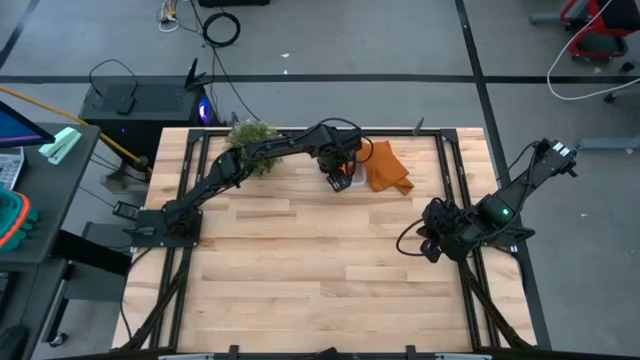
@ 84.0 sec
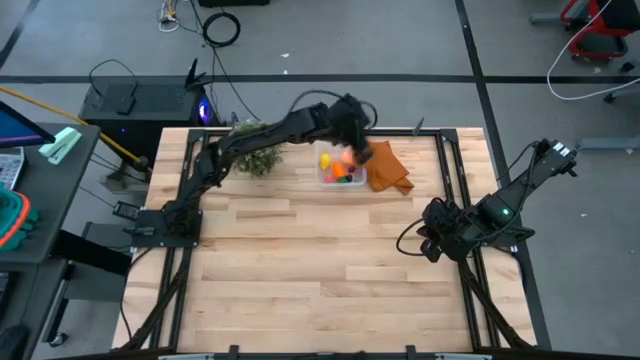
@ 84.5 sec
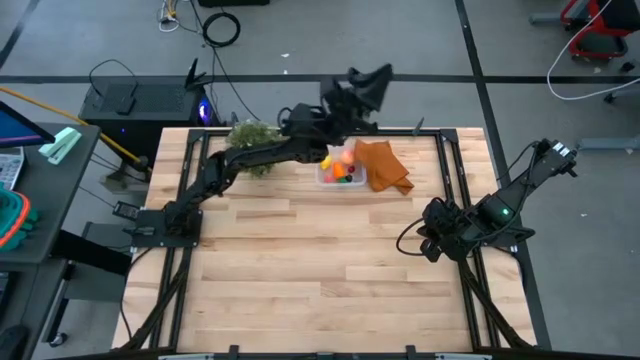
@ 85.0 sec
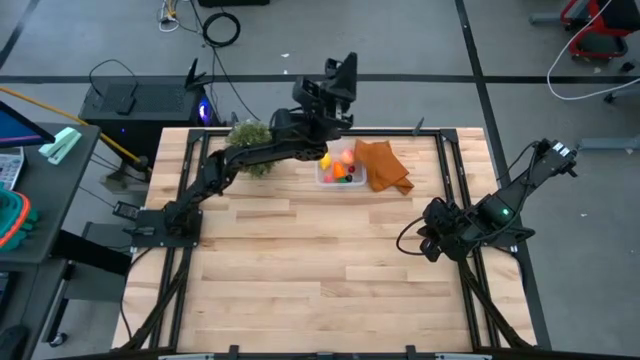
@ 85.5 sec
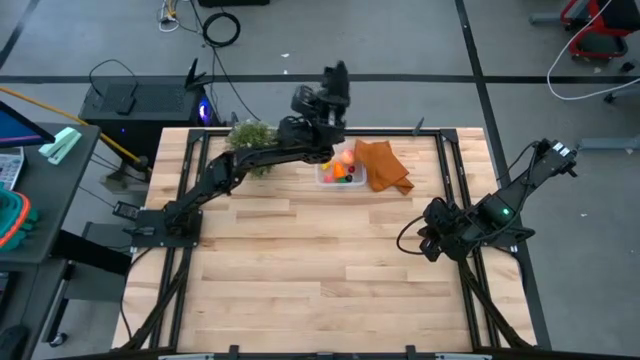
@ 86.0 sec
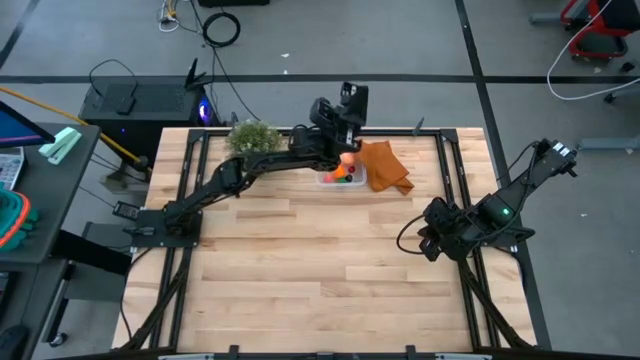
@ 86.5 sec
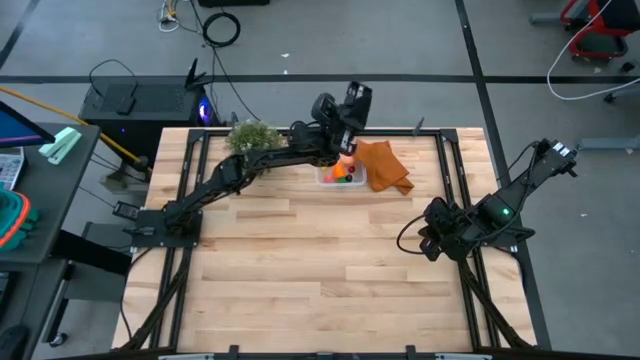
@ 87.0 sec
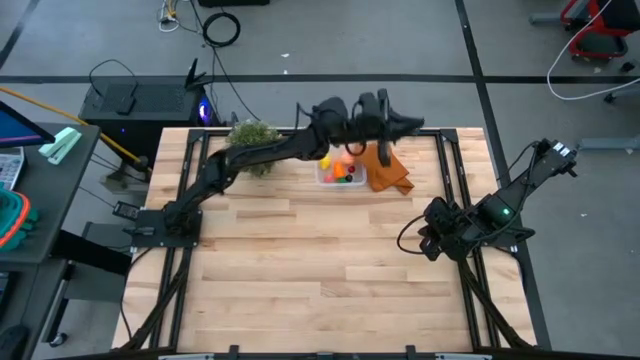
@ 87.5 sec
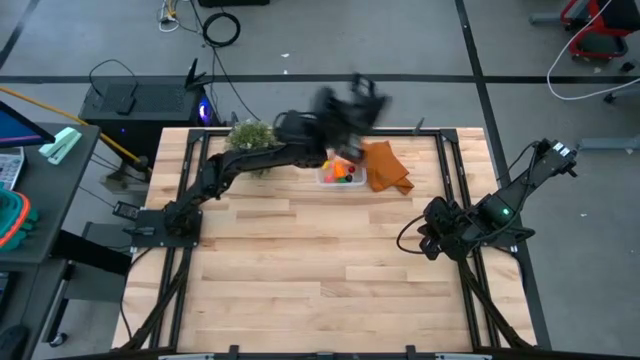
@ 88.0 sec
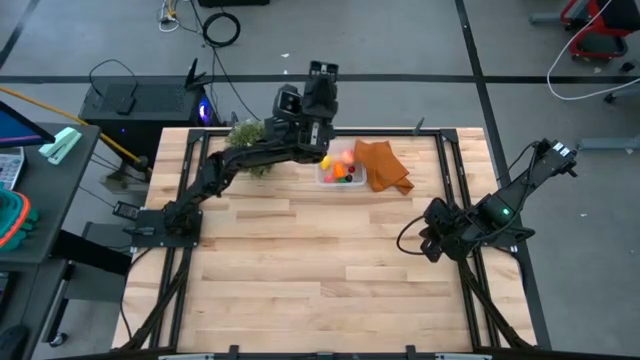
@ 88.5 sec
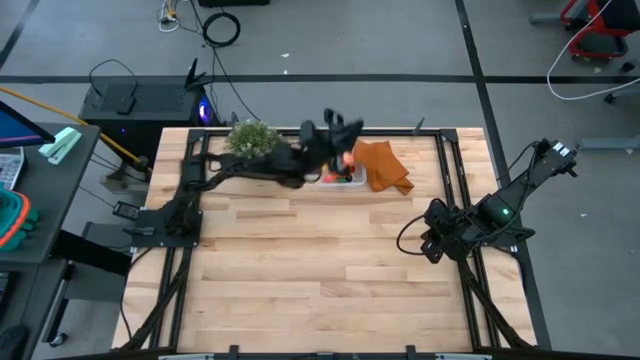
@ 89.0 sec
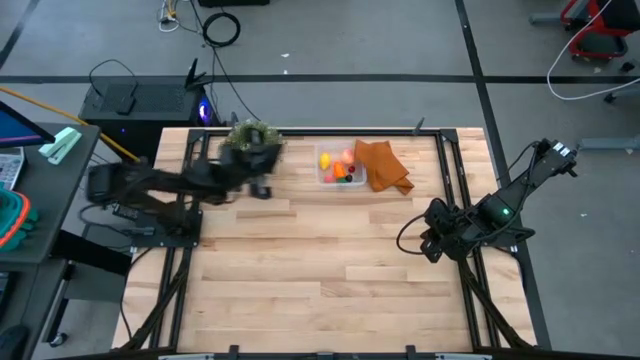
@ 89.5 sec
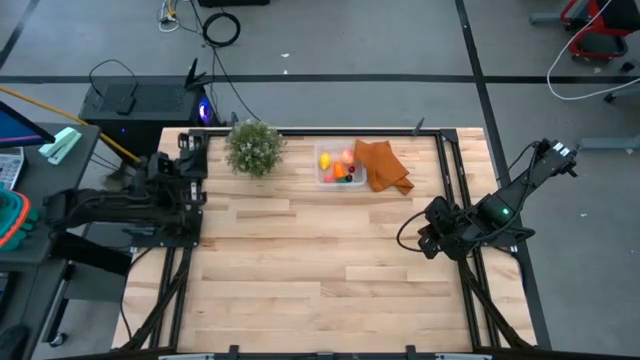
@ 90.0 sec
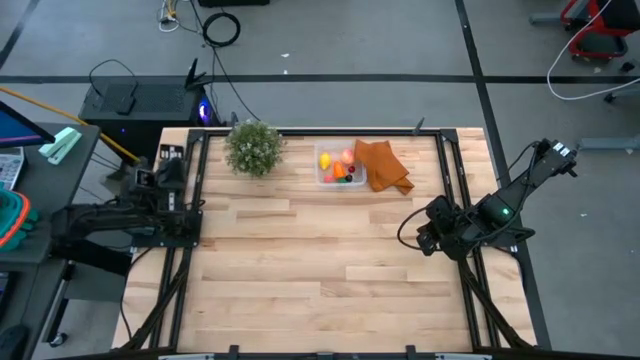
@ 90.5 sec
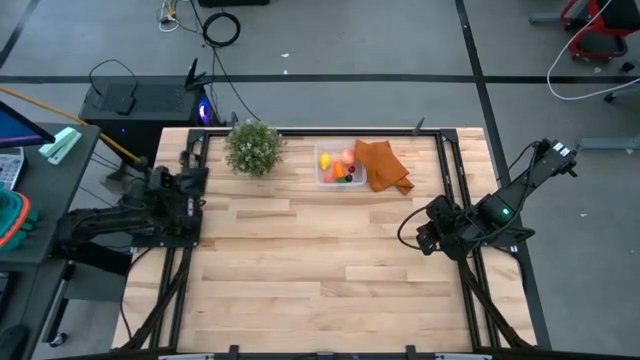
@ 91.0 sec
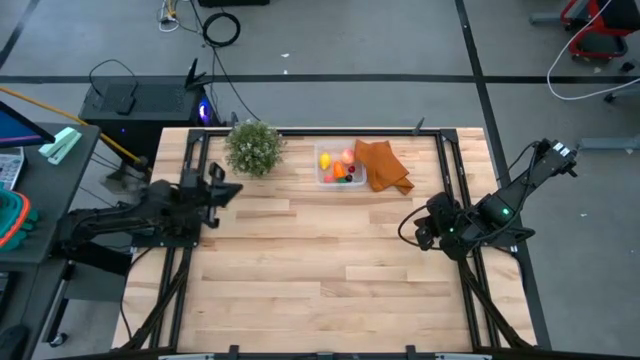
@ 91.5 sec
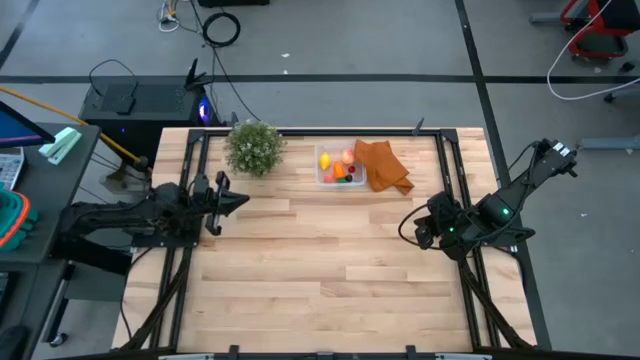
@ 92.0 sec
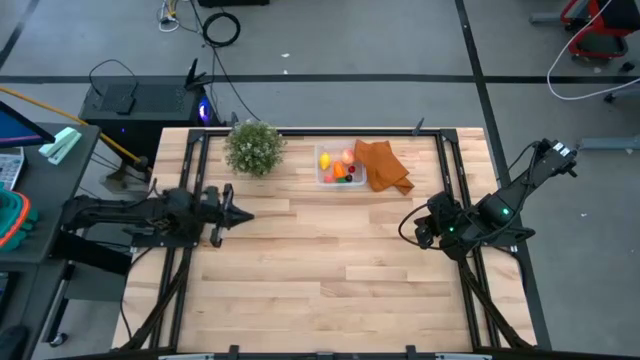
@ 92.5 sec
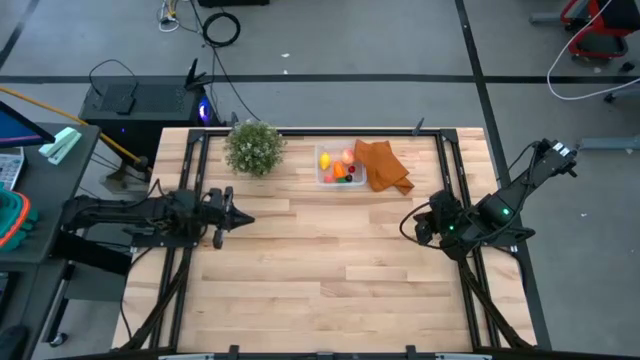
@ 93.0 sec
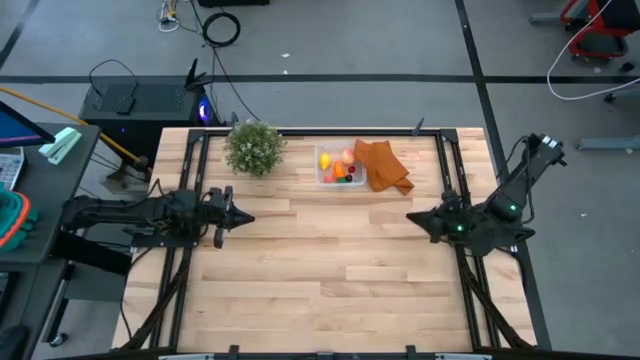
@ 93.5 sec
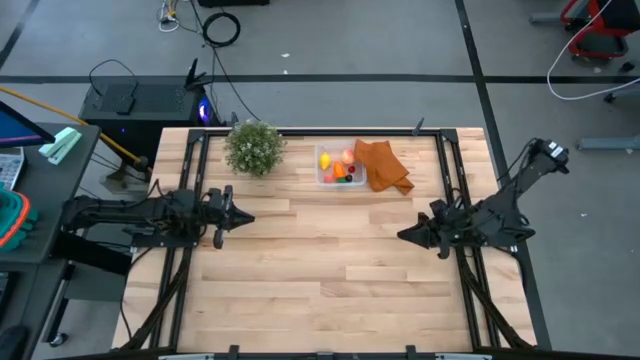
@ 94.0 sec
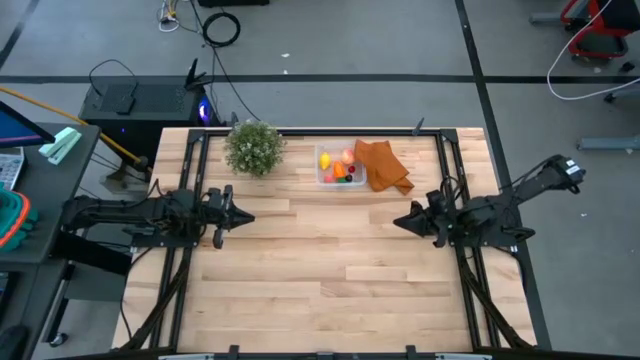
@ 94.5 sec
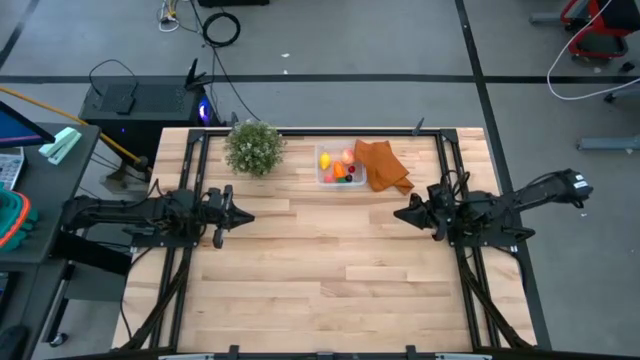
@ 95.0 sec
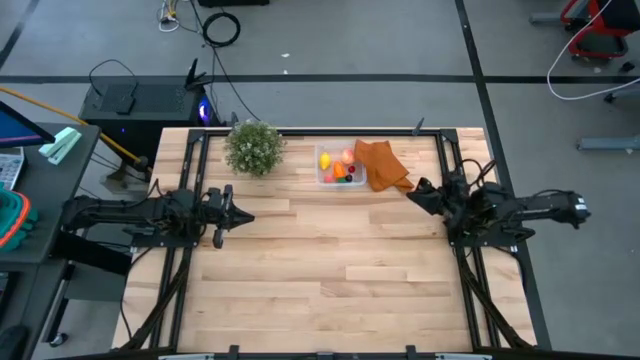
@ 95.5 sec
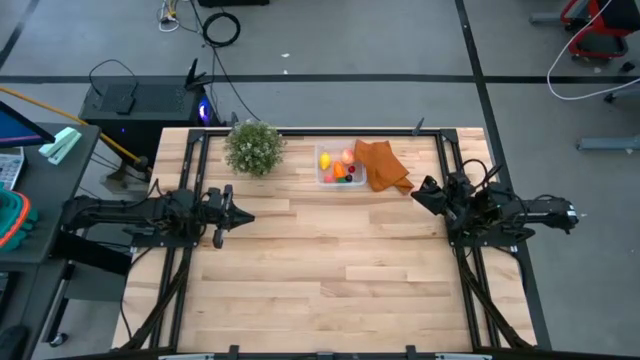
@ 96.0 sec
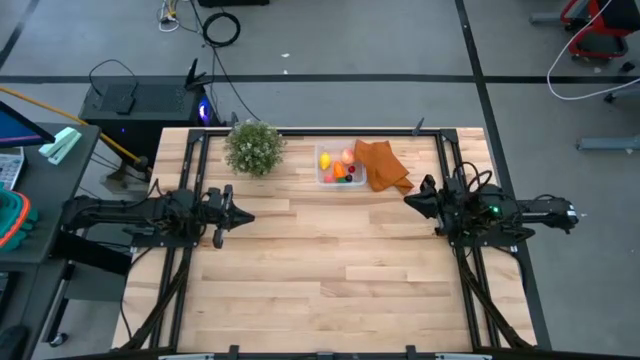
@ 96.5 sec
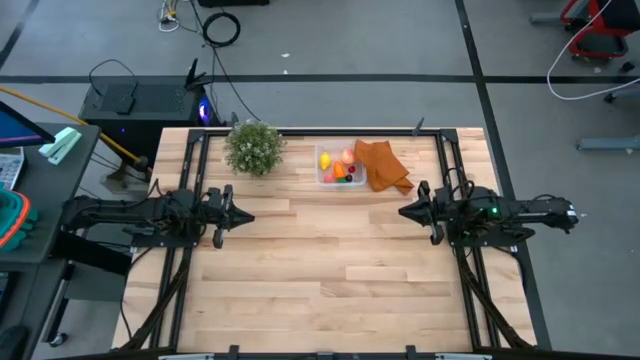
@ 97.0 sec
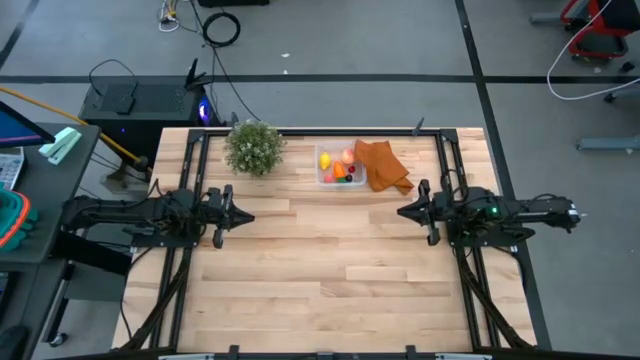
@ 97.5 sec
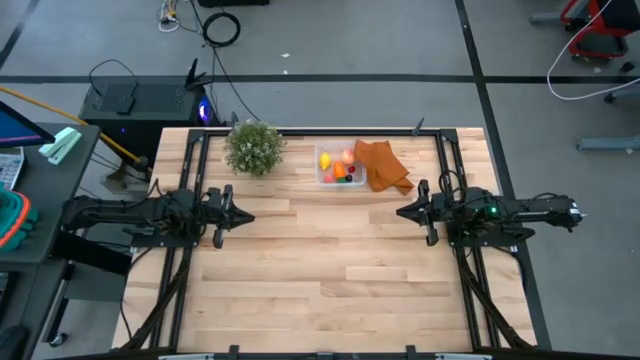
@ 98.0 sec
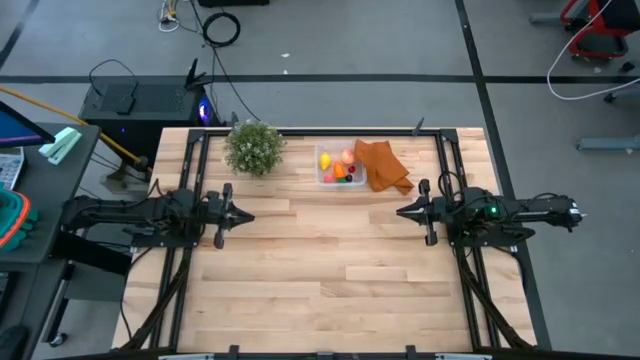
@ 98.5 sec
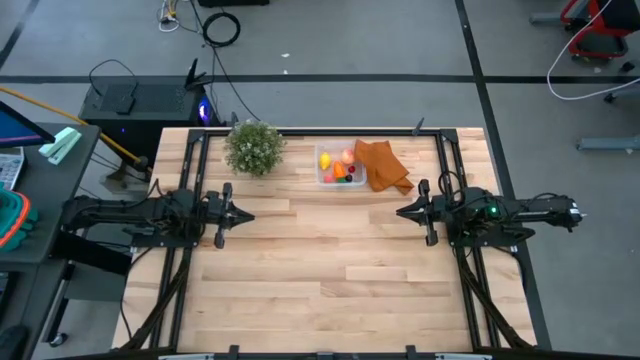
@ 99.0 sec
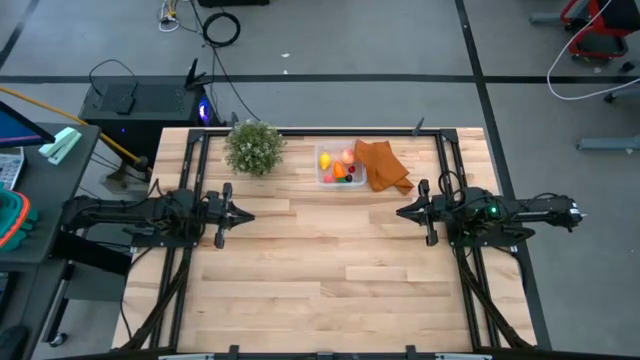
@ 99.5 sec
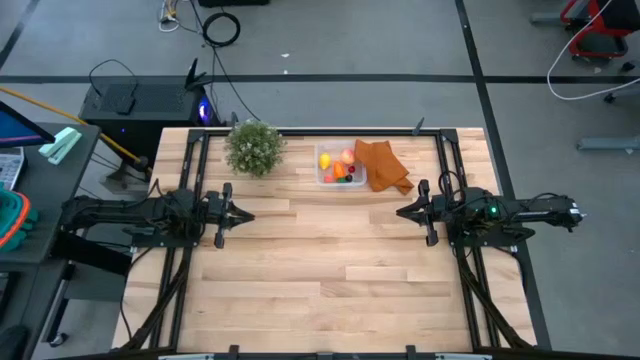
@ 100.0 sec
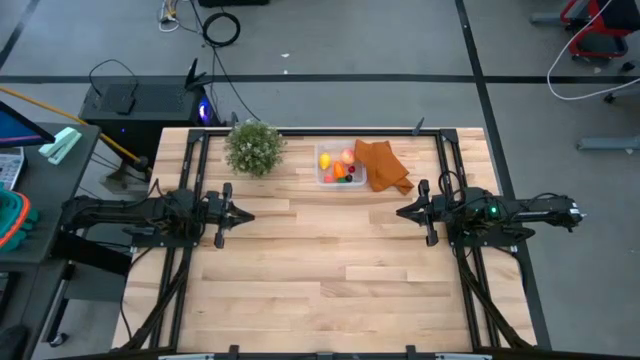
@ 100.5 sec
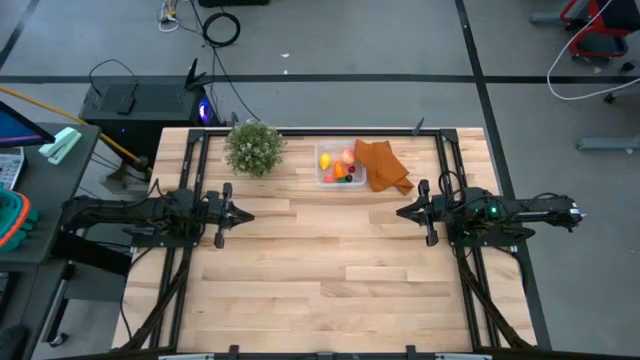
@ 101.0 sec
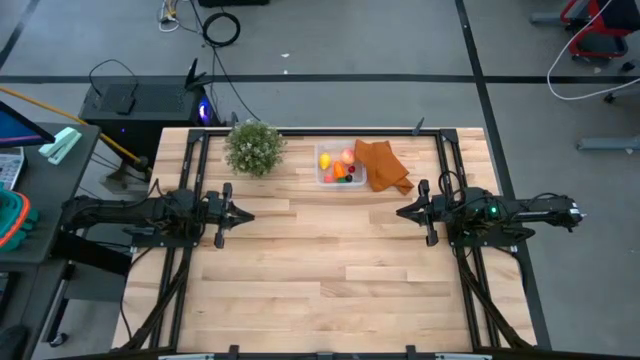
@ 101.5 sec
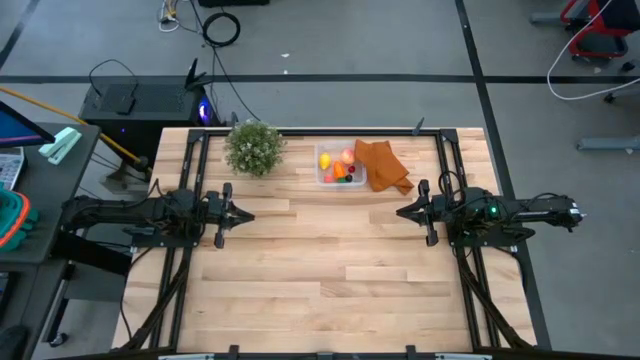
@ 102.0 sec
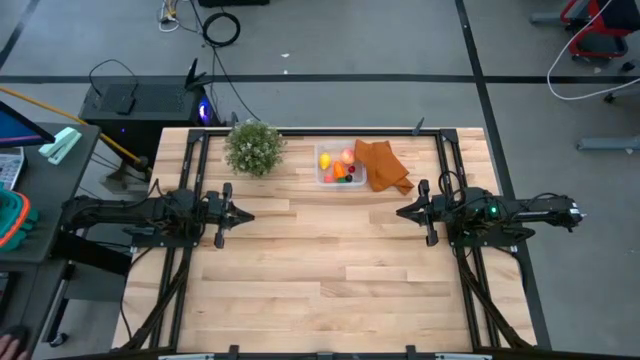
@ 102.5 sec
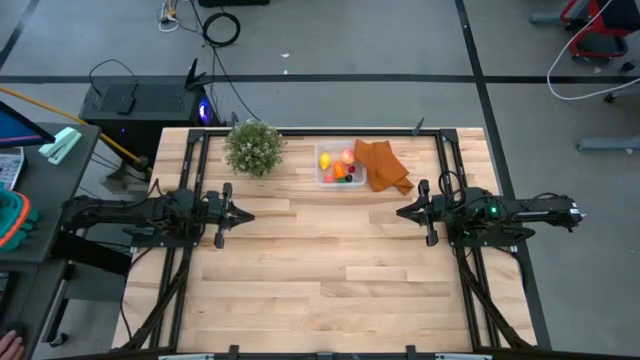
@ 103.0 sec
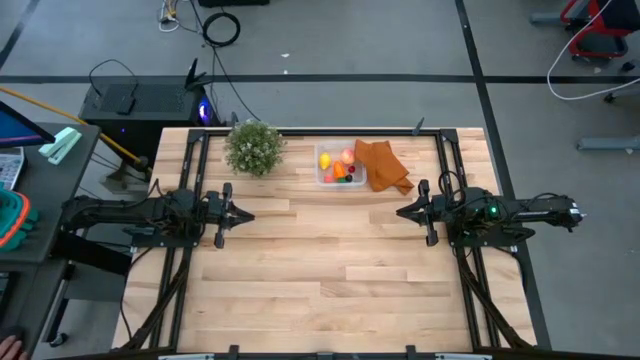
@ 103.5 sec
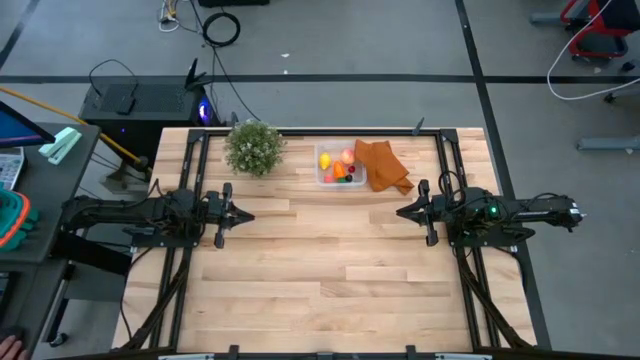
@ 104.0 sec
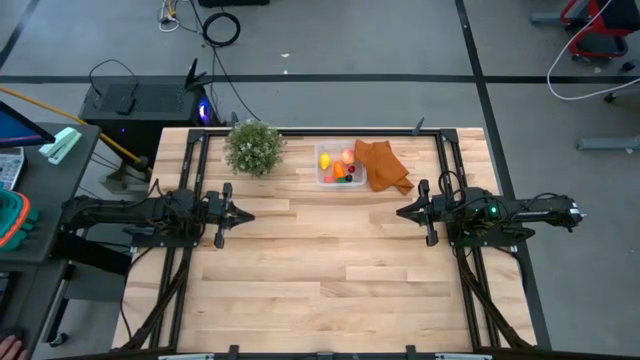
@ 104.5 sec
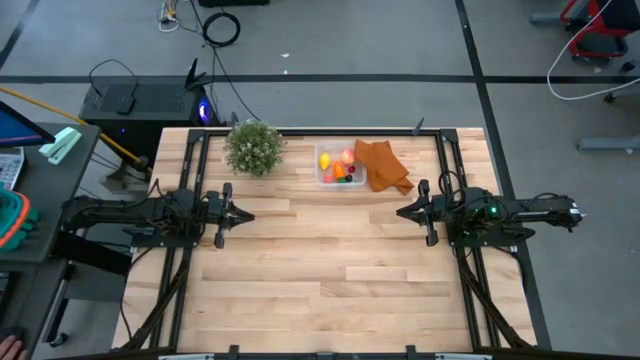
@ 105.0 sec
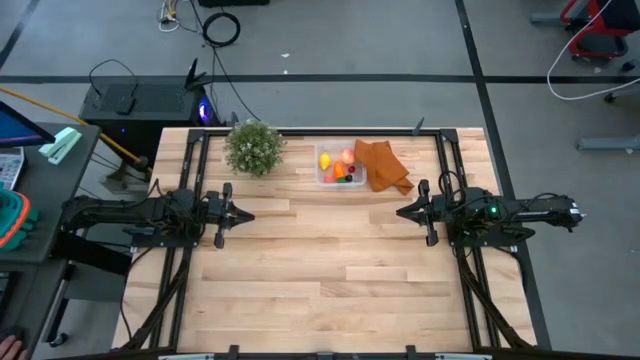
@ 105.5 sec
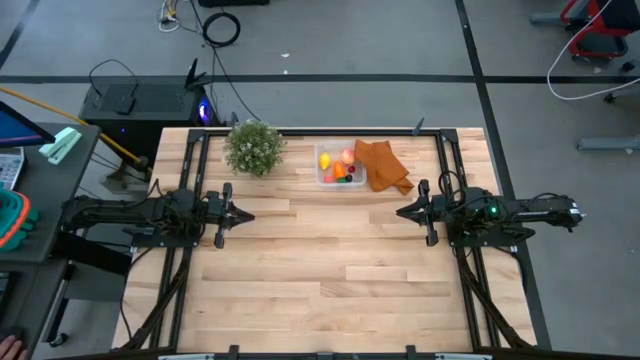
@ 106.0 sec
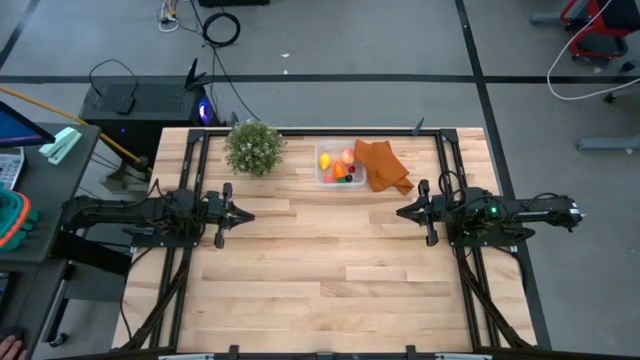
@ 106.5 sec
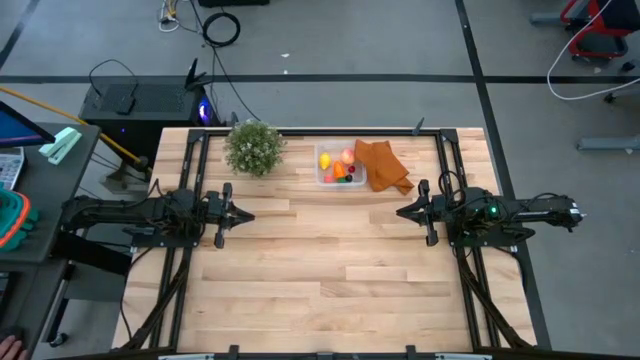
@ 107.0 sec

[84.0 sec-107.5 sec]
Task: Pick and placing Produce into tupperware
Return to Home Position
